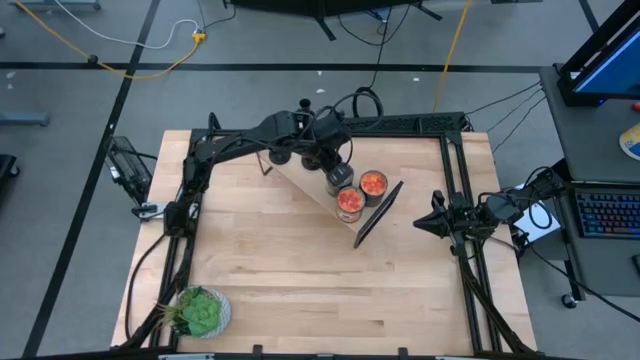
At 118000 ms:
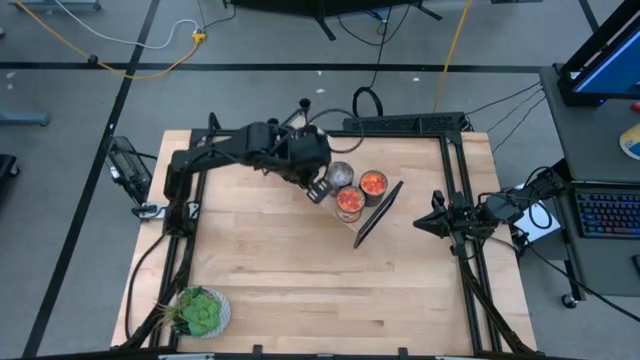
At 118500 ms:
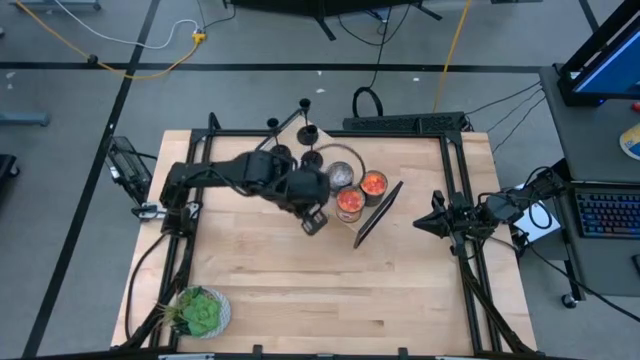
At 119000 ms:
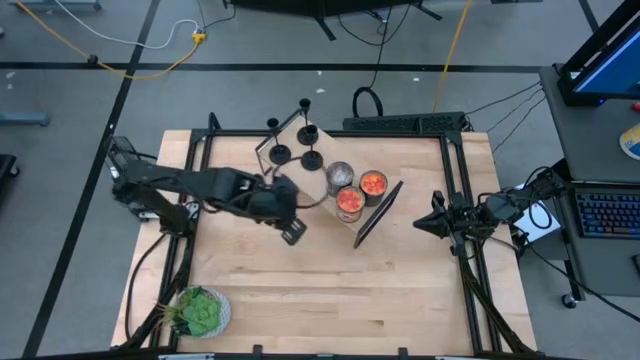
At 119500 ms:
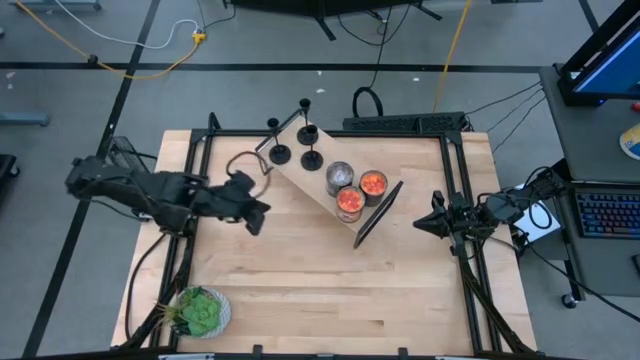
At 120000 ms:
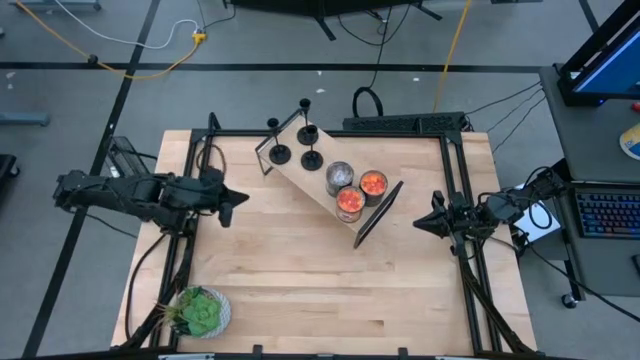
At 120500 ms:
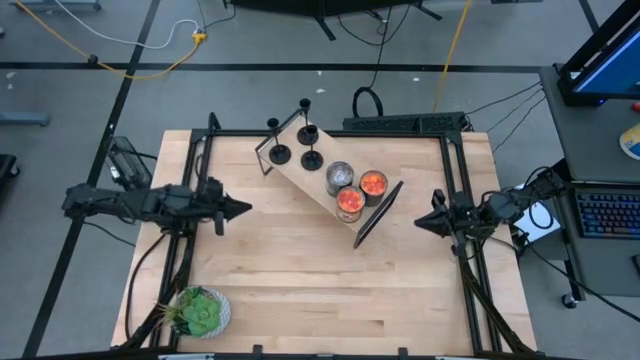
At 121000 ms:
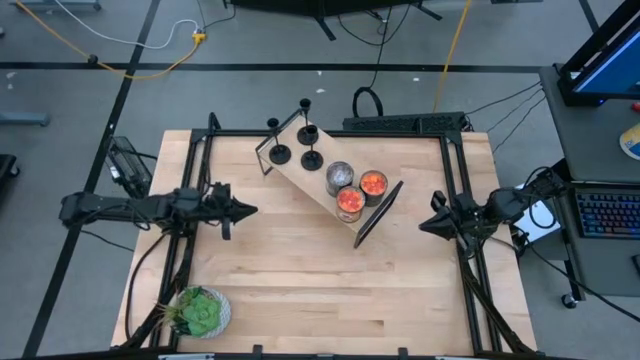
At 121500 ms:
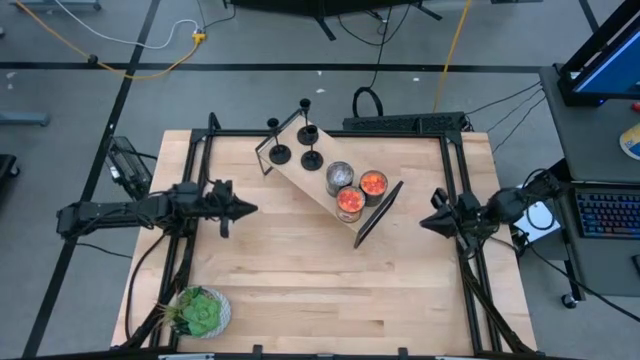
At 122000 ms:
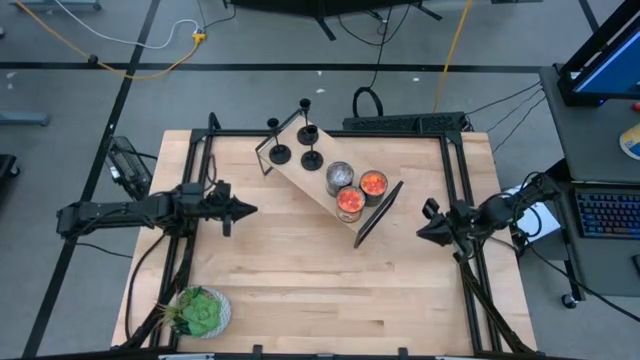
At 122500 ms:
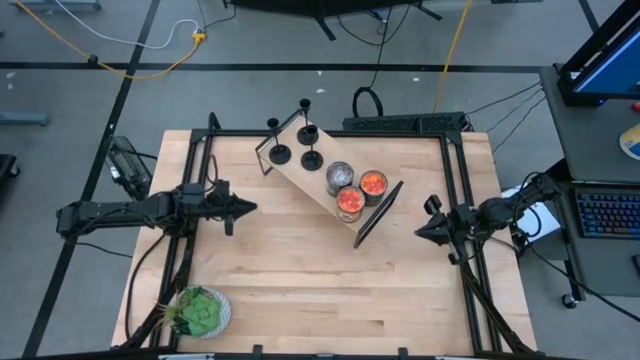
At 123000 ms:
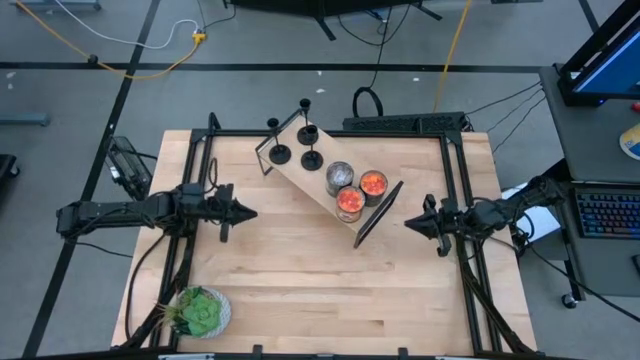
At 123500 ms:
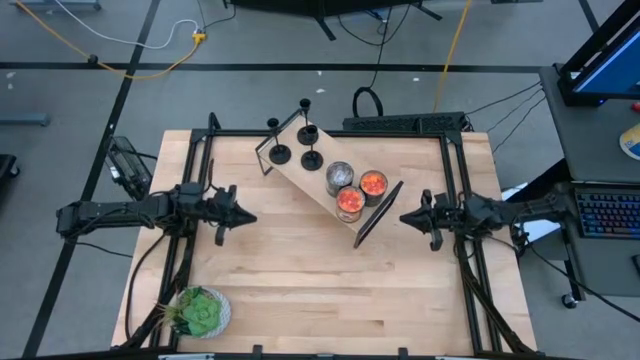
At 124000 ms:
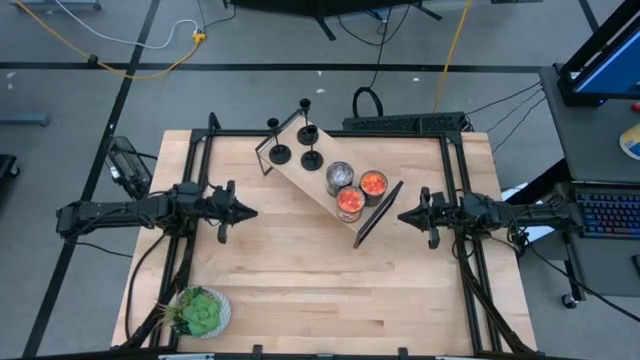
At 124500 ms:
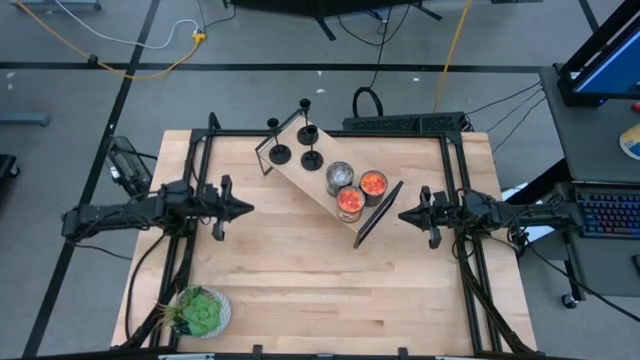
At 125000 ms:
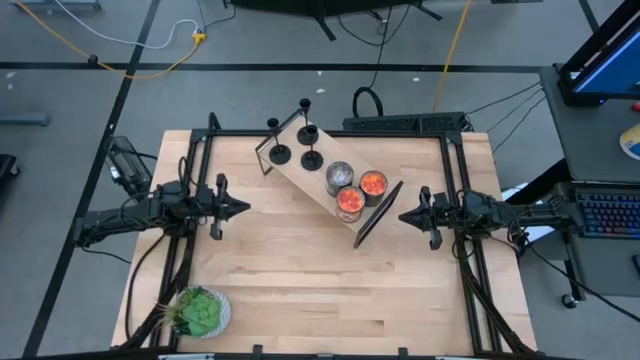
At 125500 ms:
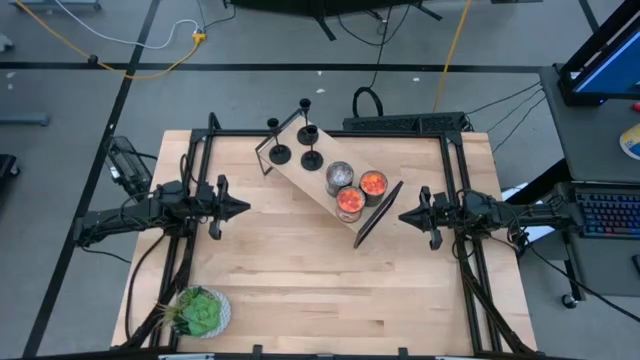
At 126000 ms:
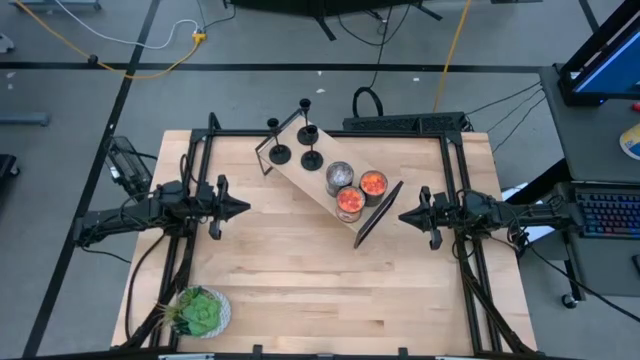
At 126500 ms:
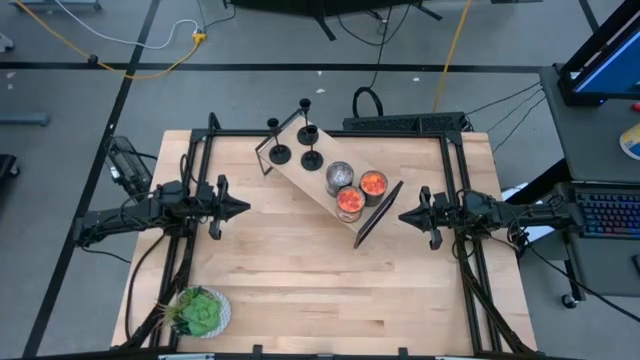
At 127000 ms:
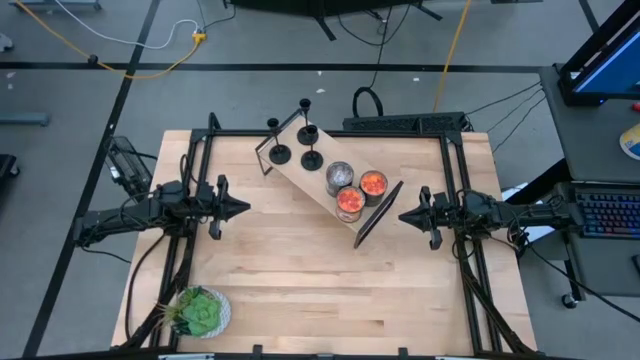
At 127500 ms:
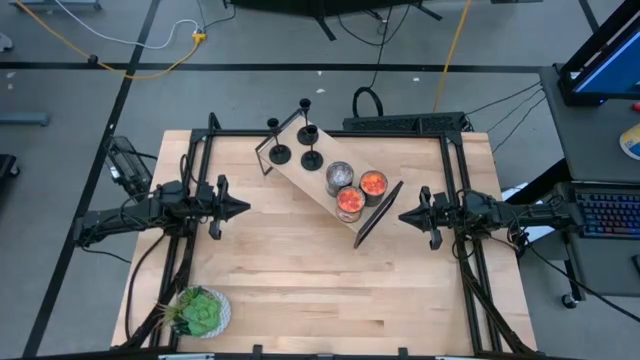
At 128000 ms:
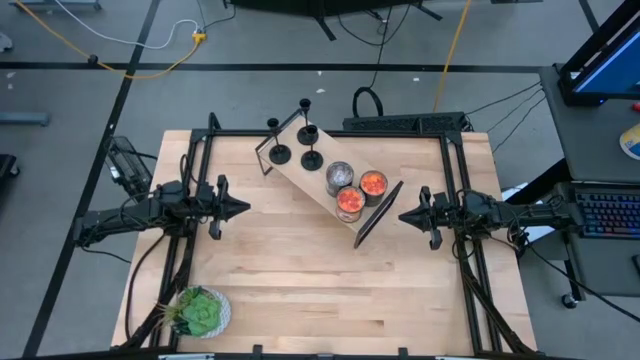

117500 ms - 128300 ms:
Task: Pick & Place candle stick holders
Return to Home Position

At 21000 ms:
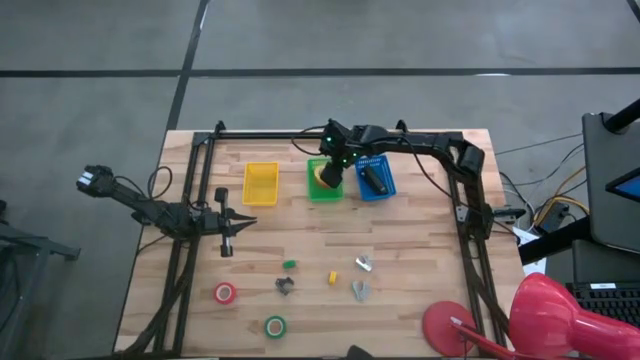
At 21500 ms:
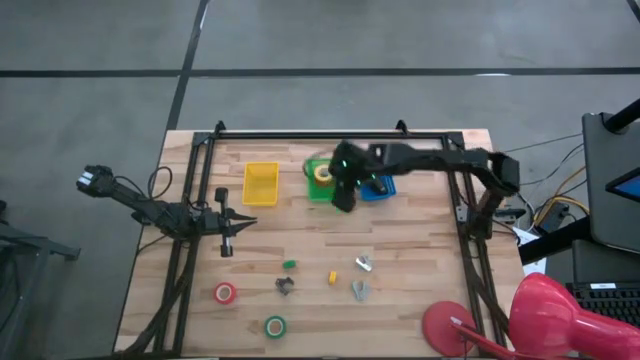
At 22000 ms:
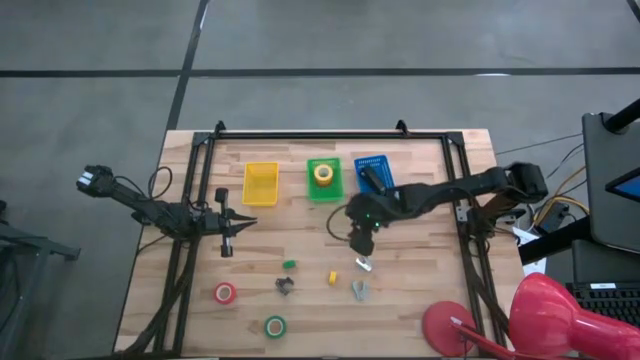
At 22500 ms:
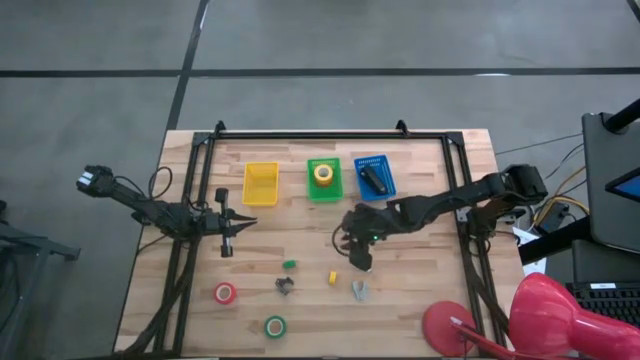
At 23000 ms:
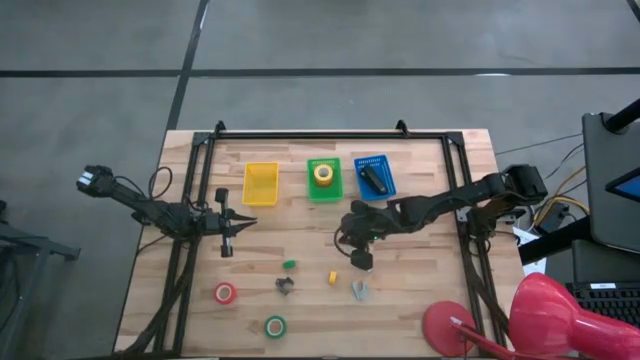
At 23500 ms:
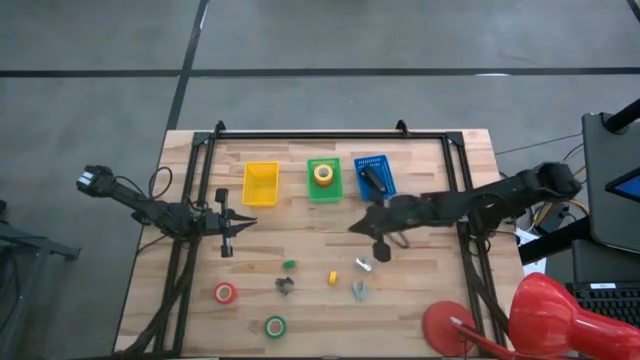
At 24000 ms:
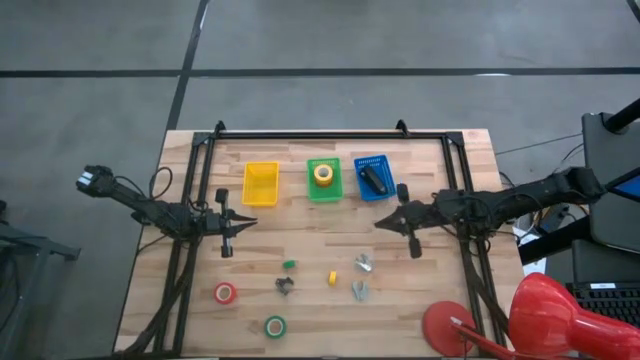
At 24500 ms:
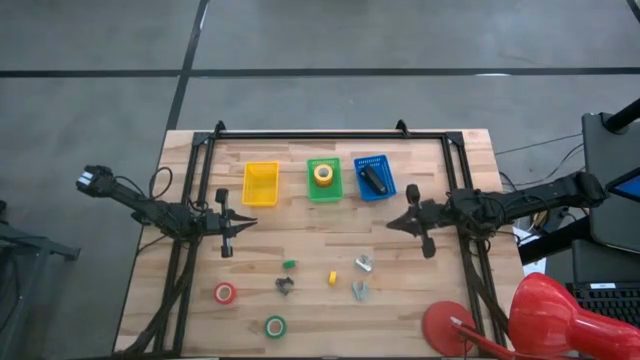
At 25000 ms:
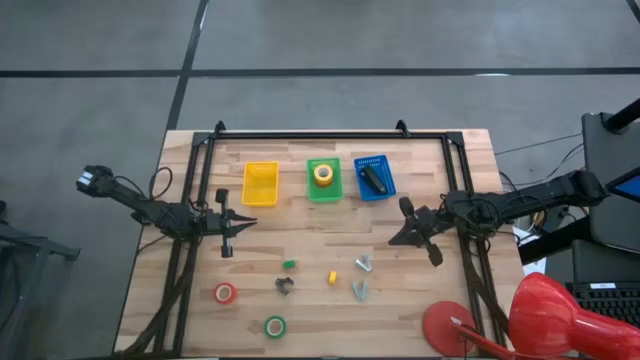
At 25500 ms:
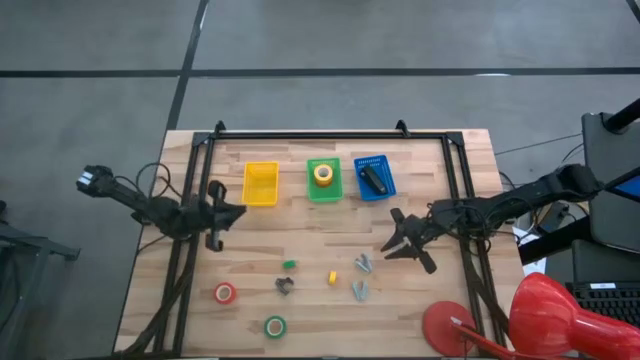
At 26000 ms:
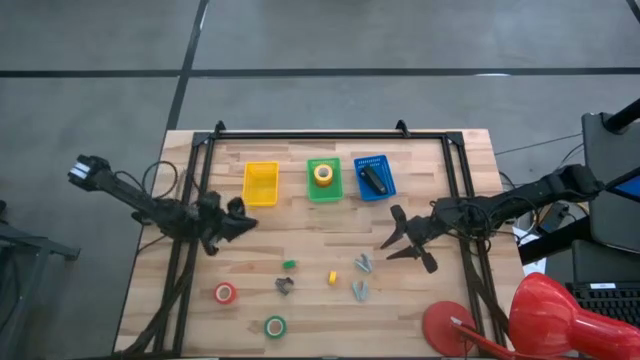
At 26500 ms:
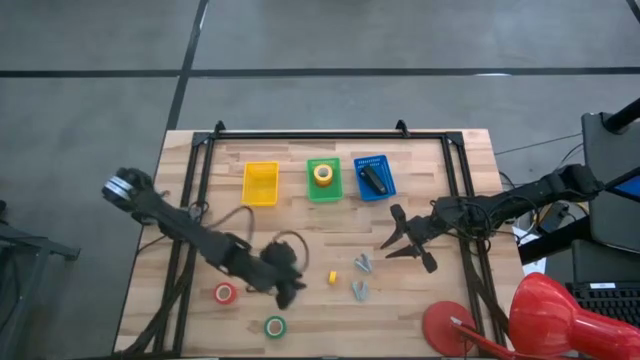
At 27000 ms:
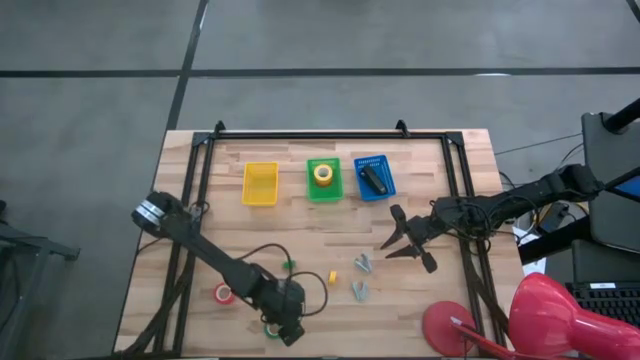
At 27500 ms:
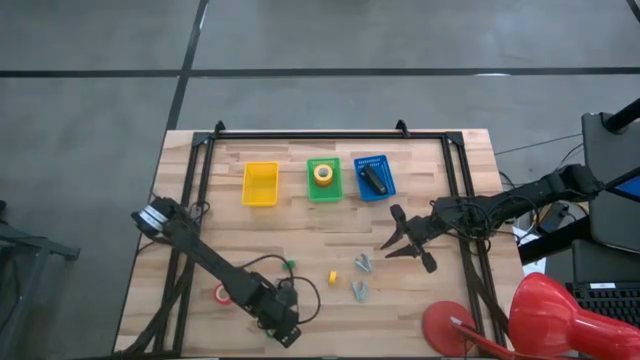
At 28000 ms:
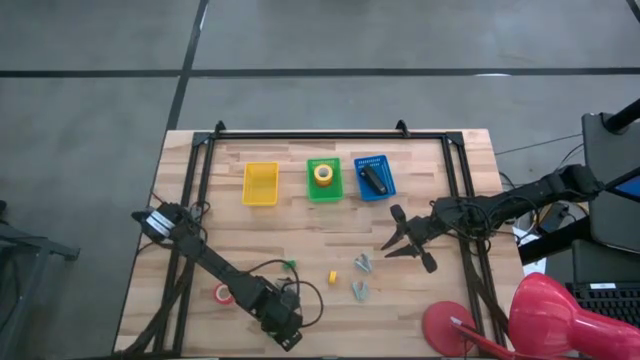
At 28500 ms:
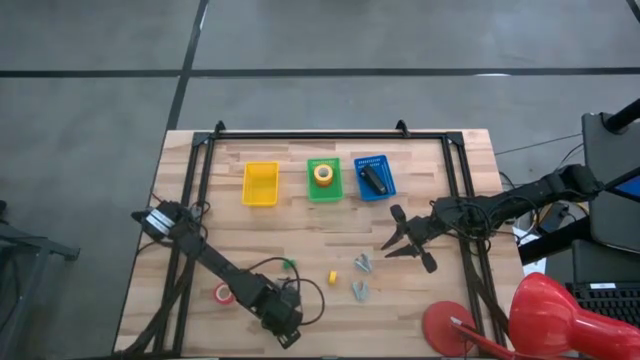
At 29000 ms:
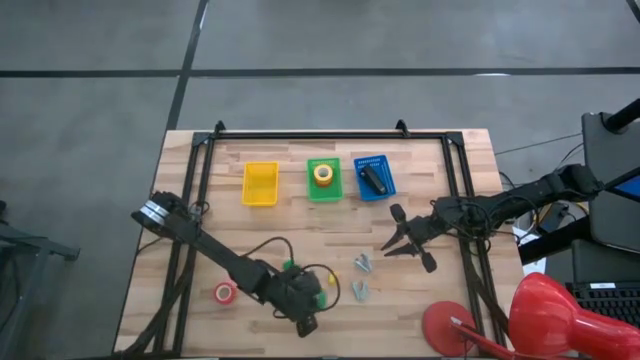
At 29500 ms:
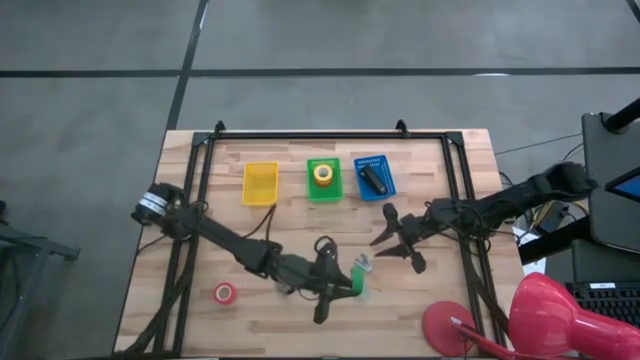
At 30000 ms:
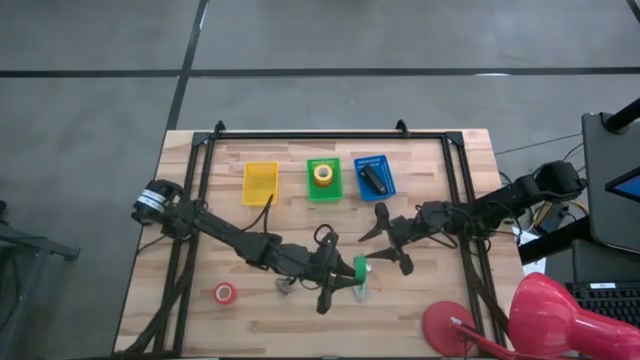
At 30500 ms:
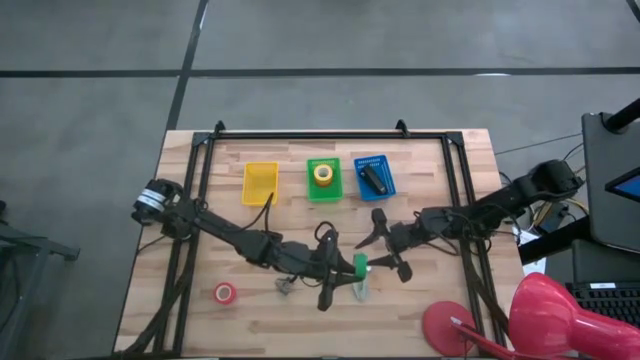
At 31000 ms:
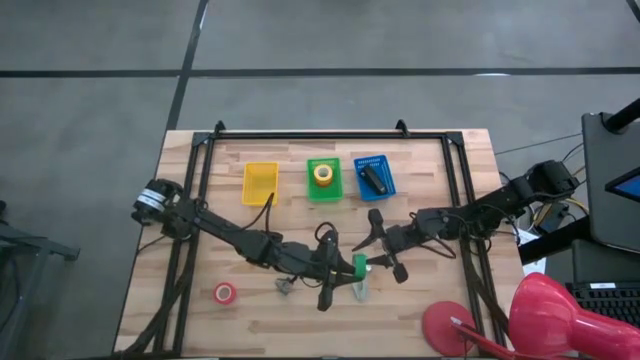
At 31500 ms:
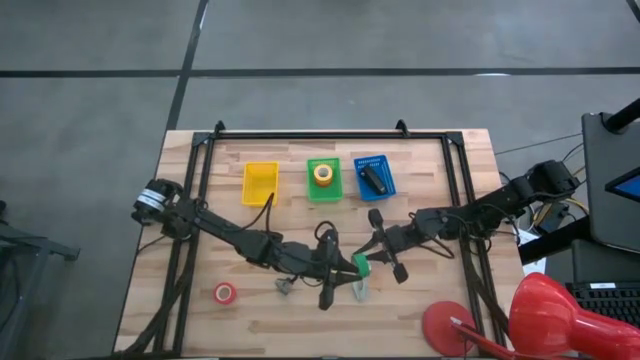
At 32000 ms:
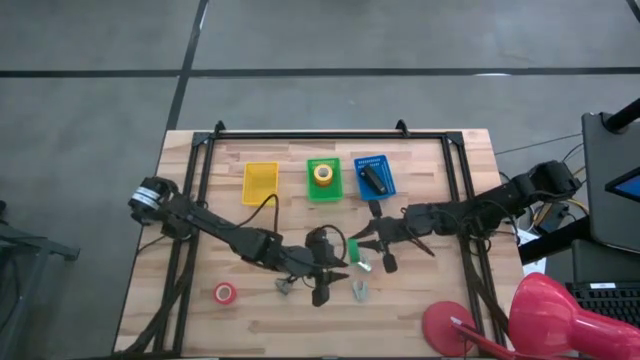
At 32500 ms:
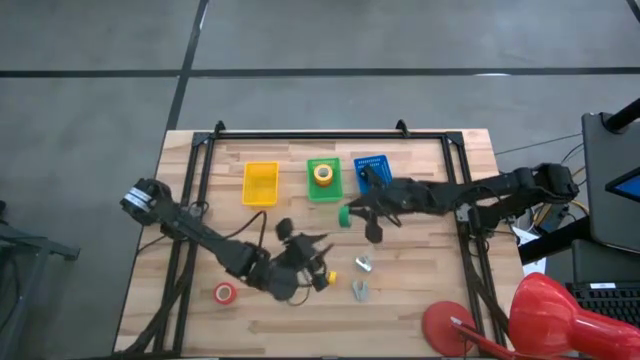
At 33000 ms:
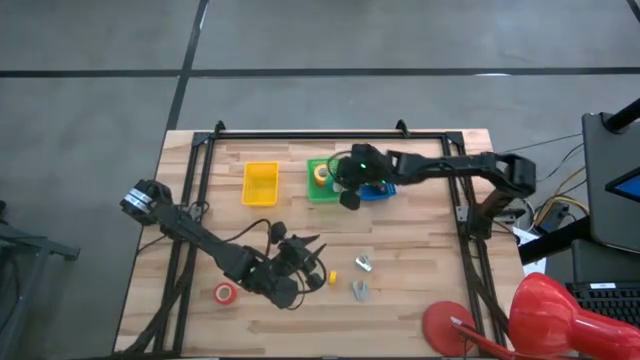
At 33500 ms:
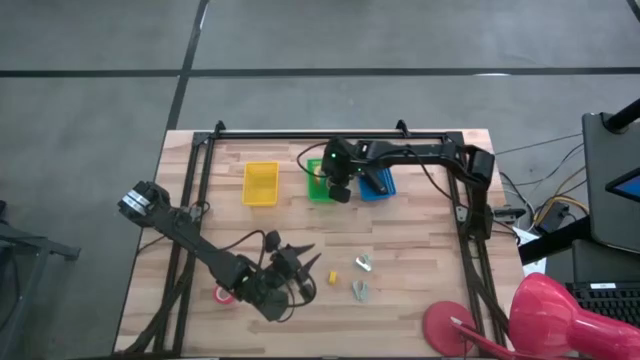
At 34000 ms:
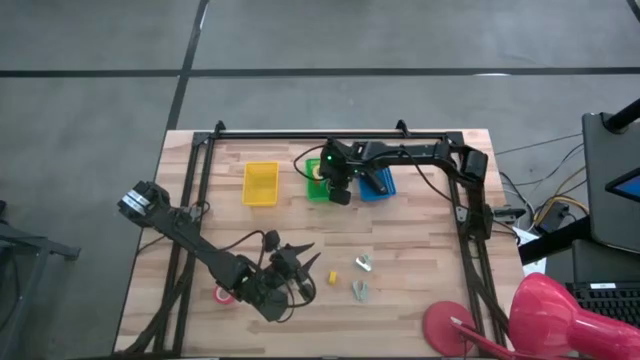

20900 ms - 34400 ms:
Task: Pick and place Stapler, Stapler remover, tape
Put the green tape into the green bin
